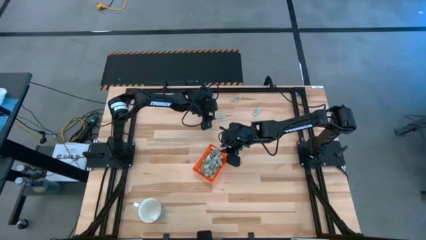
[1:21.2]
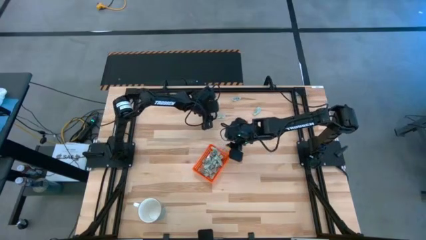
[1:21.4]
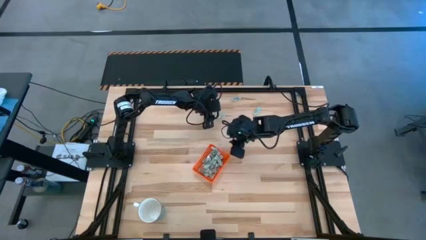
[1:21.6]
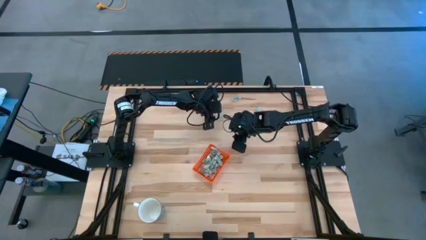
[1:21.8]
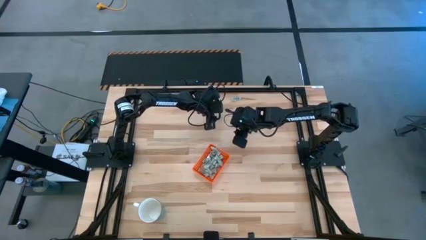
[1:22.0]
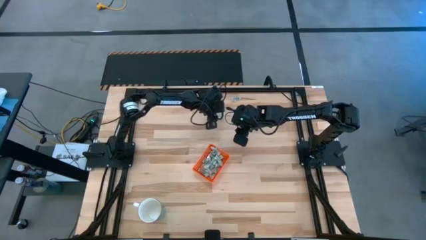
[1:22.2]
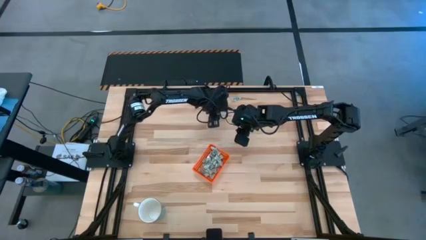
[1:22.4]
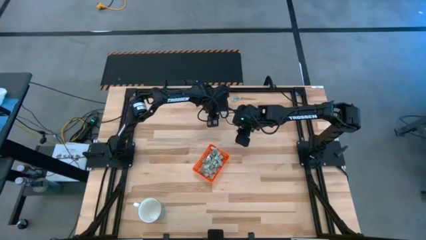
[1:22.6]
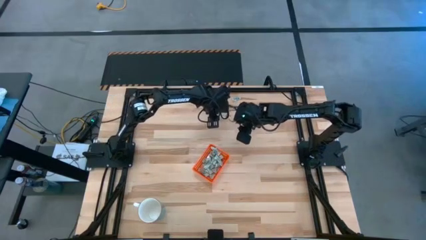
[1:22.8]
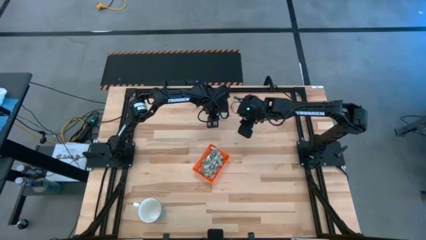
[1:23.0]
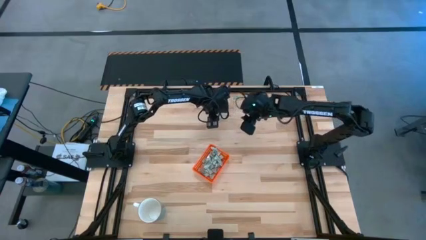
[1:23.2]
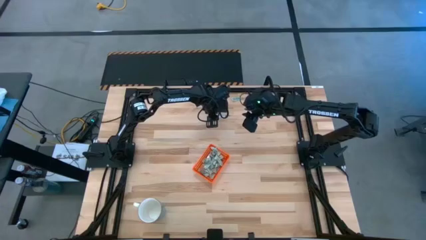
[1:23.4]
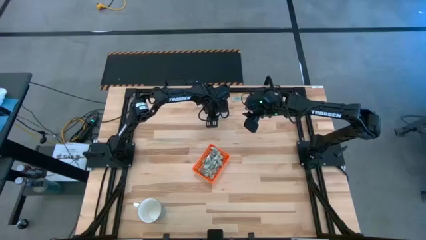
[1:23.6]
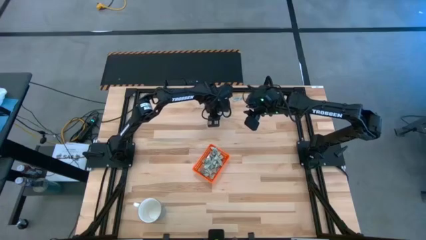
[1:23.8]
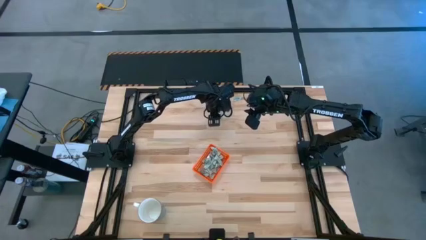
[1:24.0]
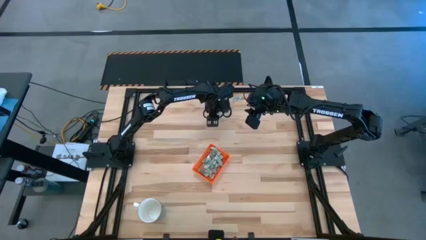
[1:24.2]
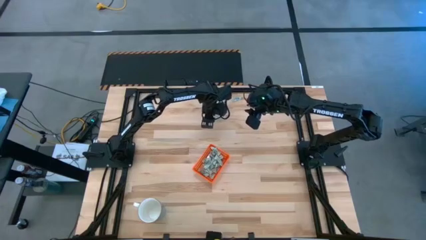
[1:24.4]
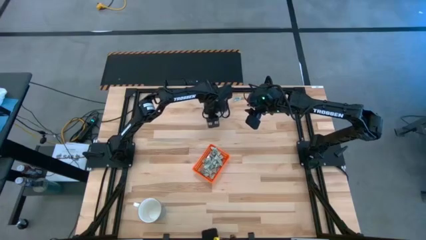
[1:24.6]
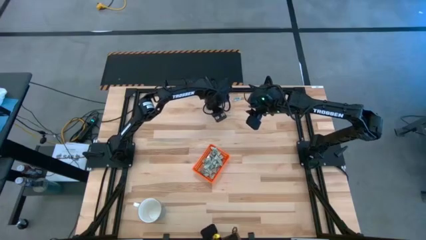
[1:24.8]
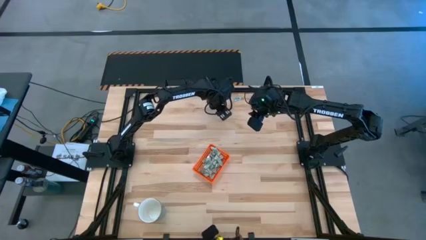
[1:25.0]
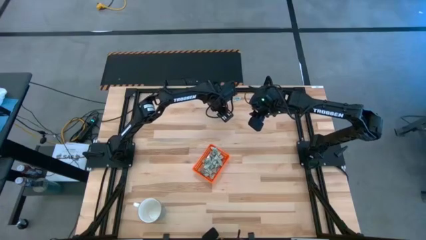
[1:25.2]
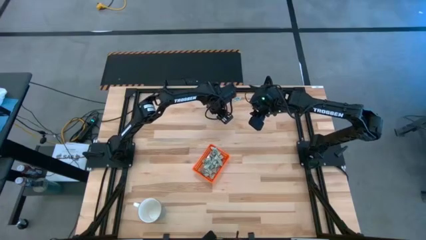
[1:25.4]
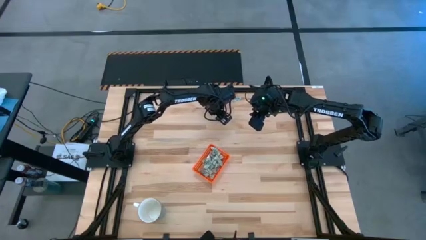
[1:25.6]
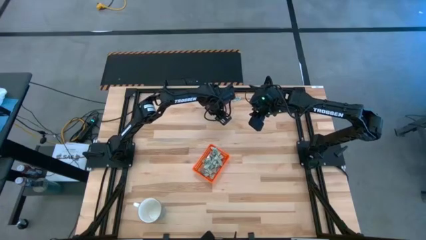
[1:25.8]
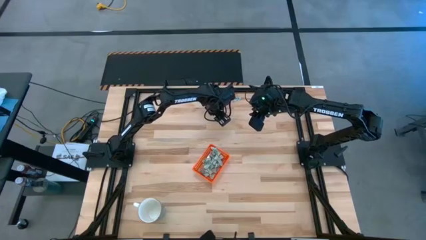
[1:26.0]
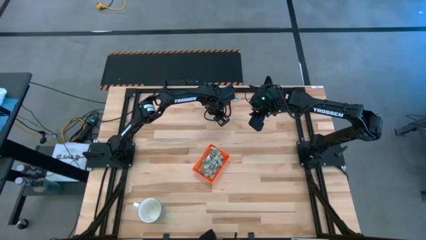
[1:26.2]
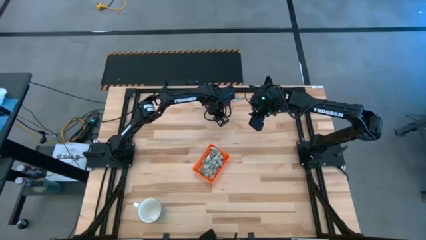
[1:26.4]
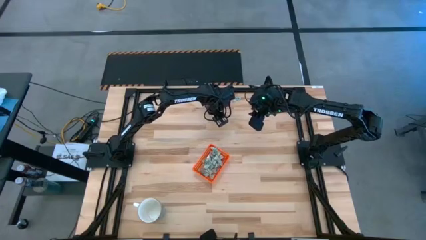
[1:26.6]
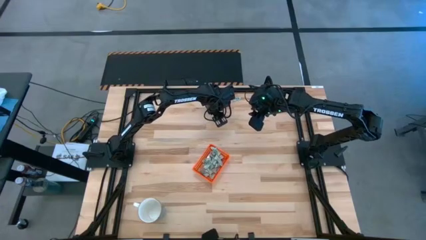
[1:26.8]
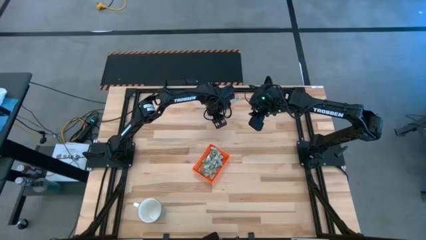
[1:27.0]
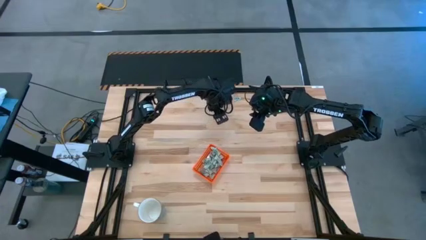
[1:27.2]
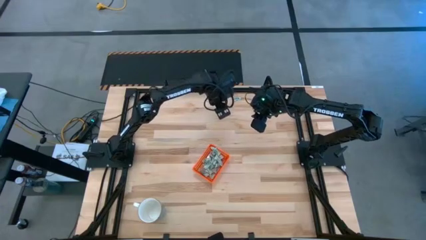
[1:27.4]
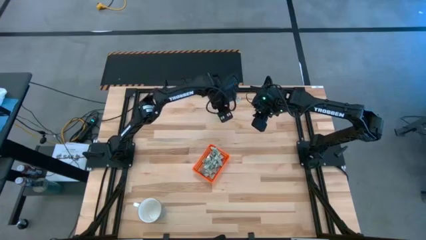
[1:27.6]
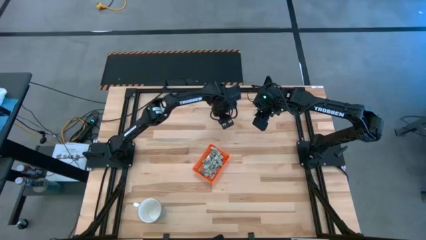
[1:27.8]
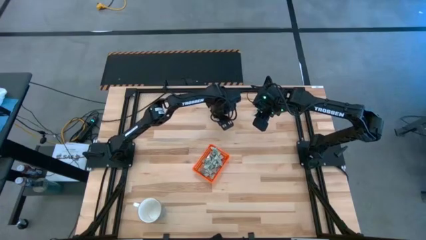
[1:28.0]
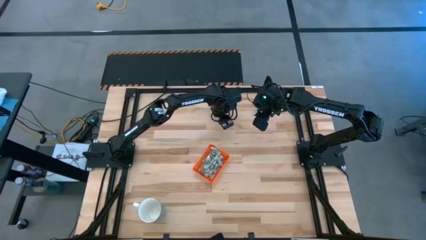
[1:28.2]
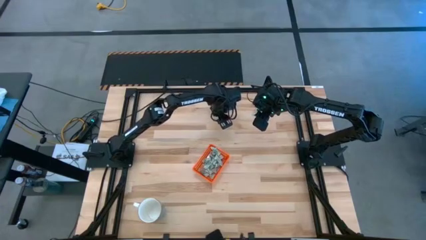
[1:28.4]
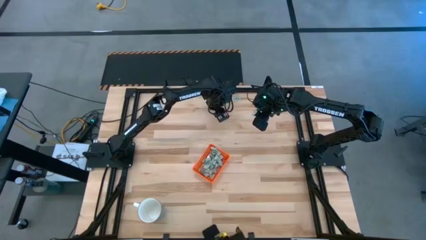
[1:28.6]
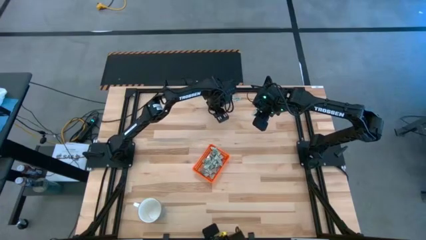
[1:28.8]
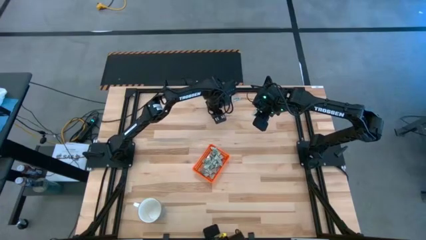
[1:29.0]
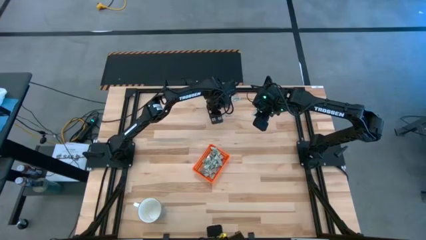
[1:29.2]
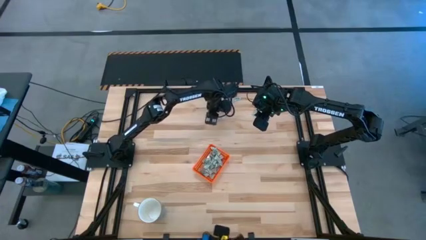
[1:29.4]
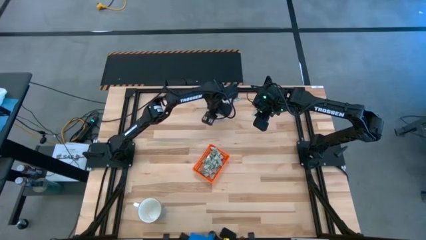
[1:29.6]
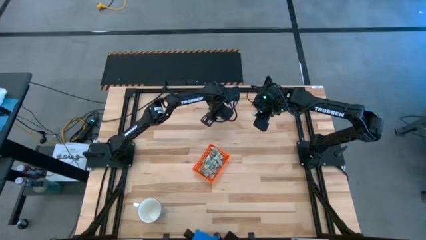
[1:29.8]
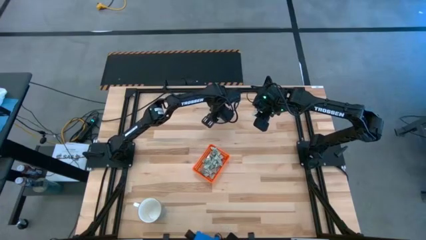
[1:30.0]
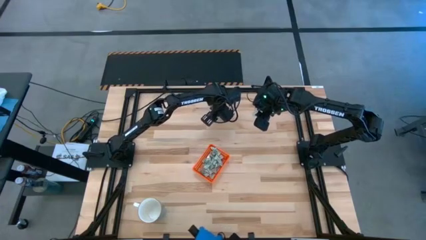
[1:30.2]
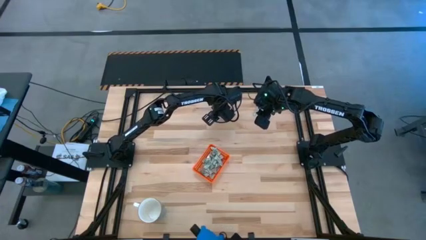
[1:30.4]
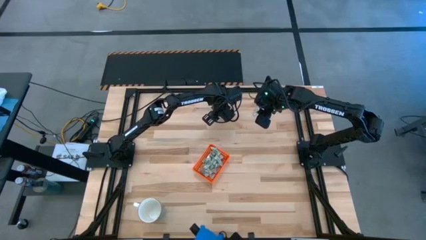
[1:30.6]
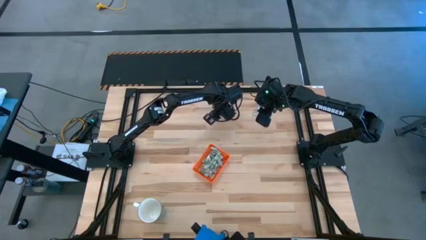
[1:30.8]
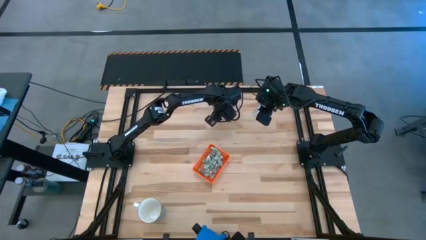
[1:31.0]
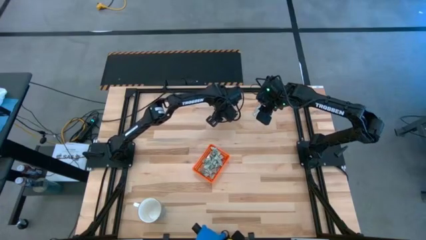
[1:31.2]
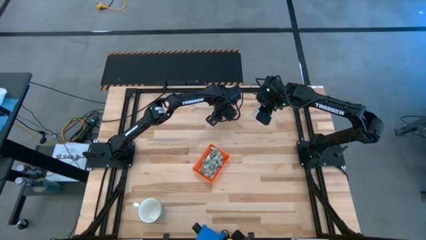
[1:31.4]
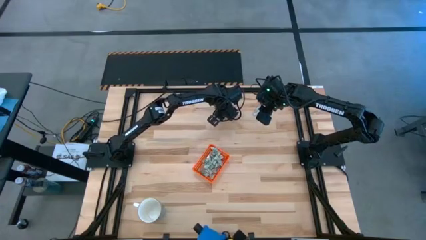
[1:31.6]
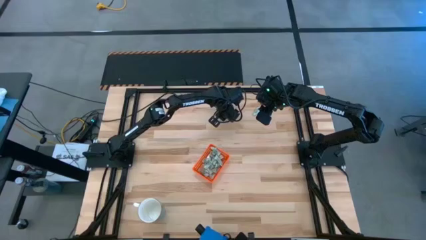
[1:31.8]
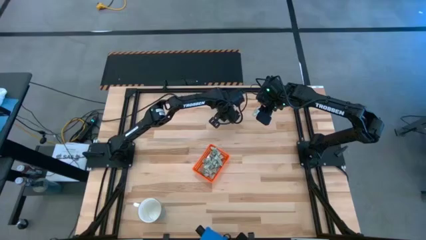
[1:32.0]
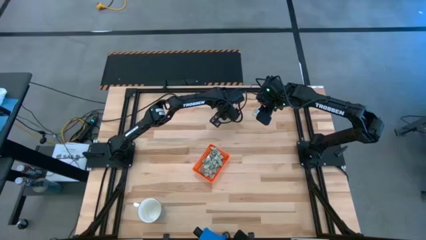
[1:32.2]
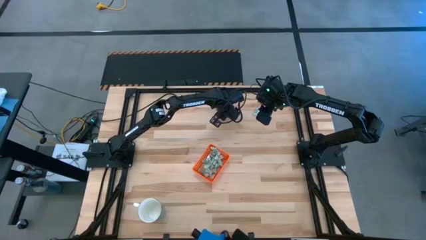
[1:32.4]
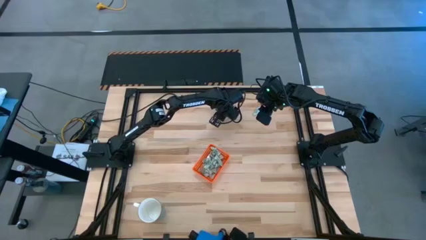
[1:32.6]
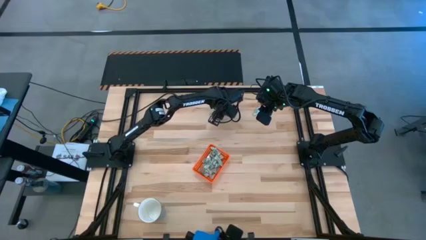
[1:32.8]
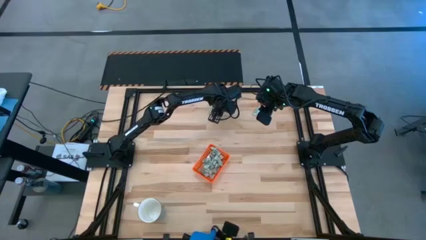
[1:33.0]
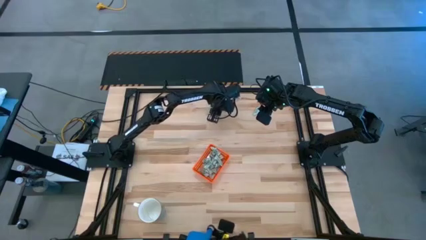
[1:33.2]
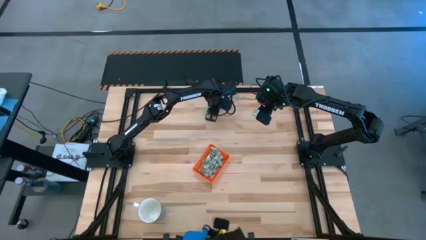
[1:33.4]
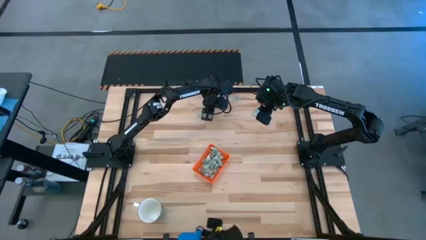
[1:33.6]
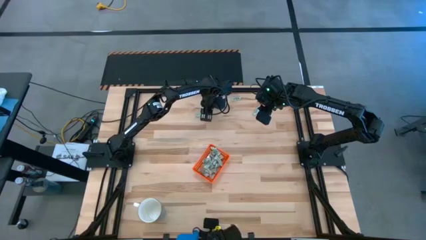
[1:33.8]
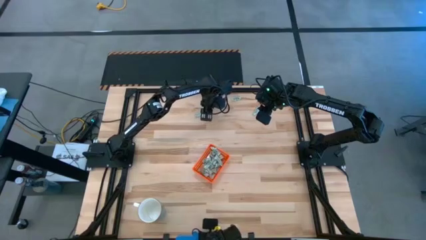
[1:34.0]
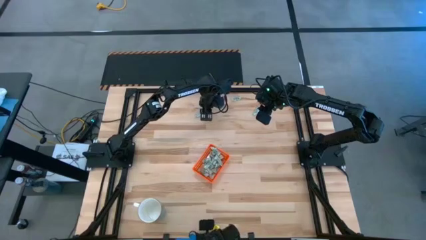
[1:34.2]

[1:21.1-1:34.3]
Task: Pick and place Stevia / Truvia into bins
Put the stevia packet into the orange bin

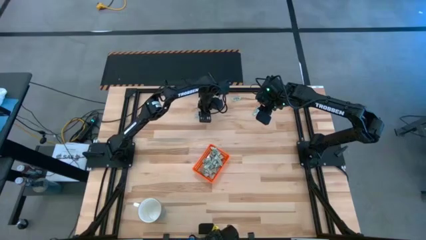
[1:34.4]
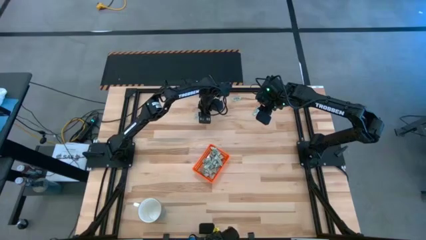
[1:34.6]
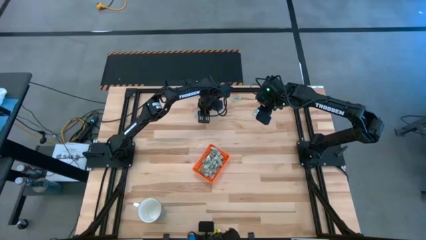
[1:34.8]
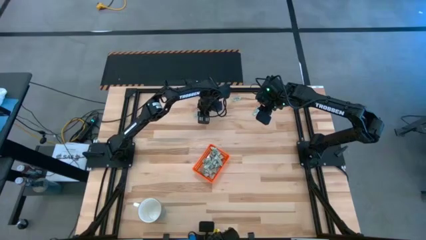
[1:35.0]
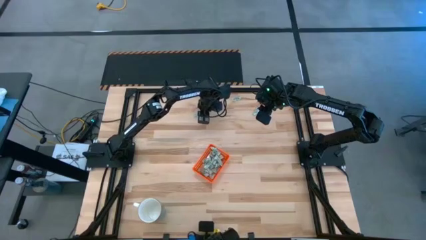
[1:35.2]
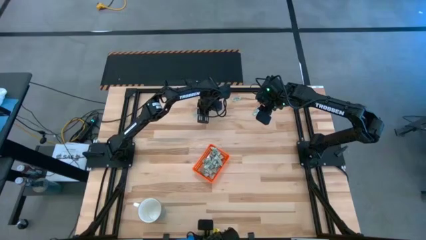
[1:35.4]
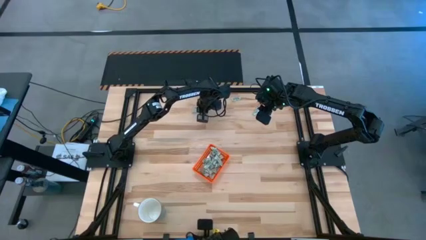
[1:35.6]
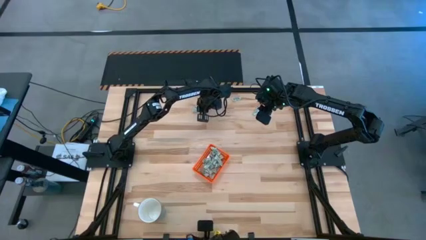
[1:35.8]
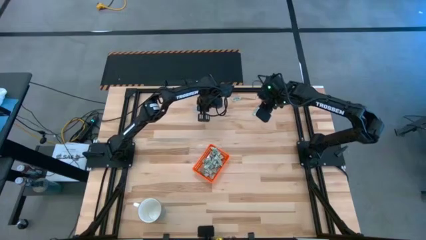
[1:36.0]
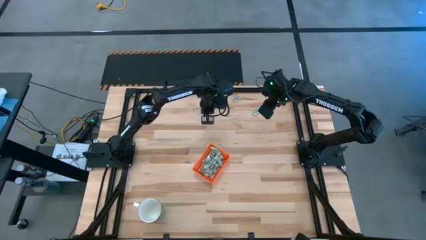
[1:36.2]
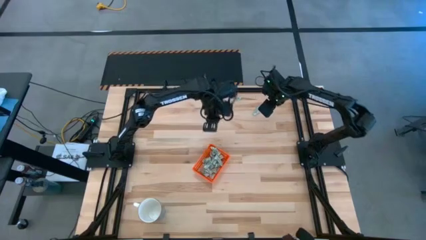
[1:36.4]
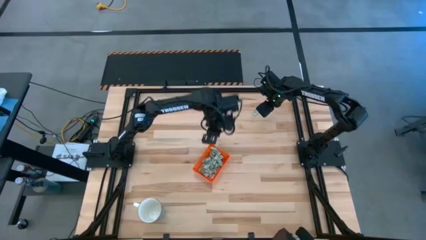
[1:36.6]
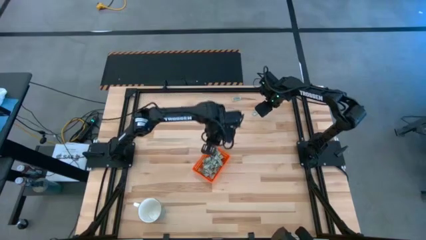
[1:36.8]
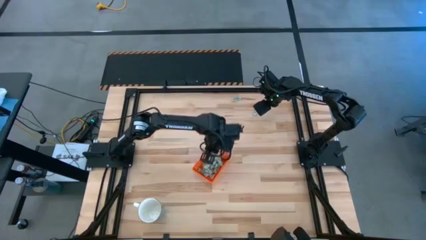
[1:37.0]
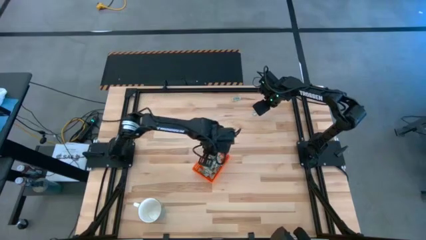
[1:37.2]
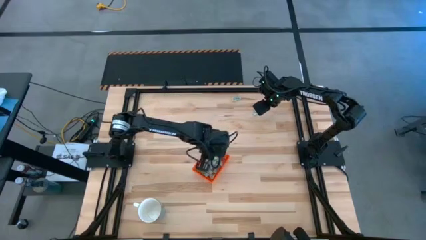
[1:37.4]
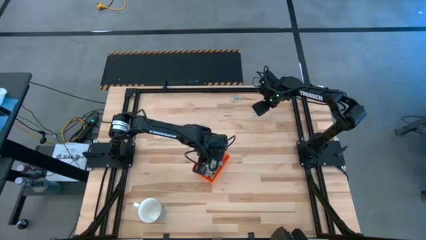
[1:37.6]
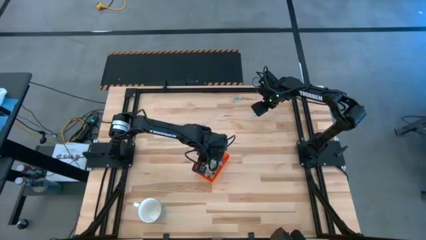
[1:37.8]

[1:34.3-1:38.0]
Put the stevia packet into the orange bin
